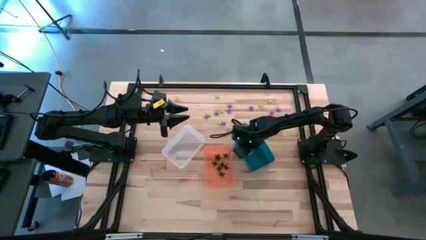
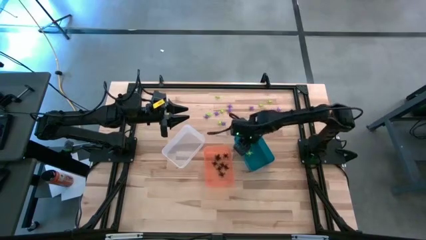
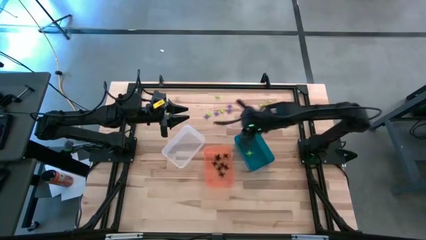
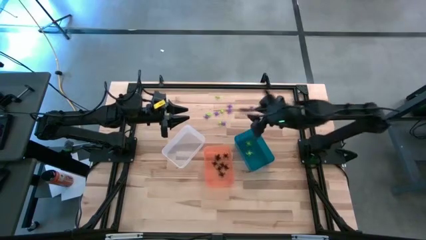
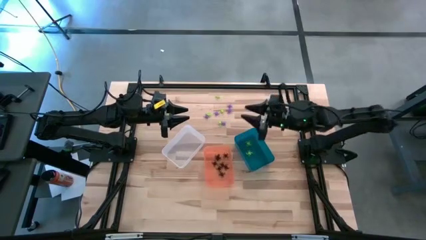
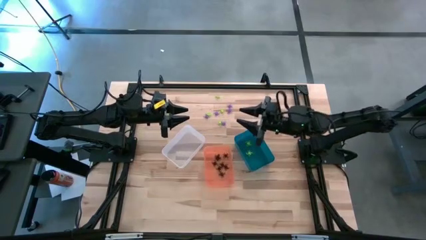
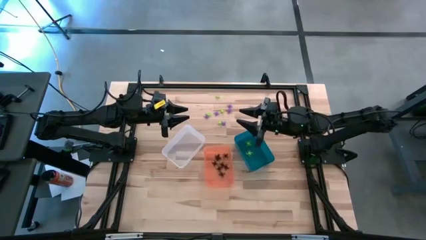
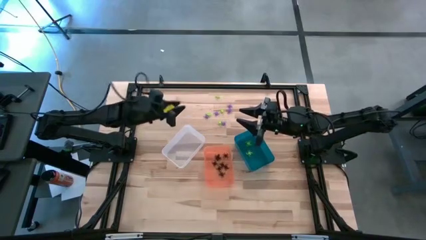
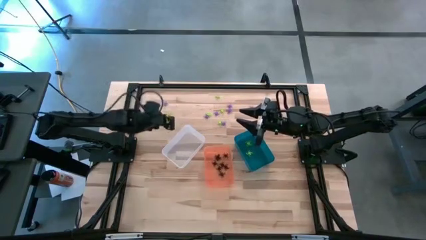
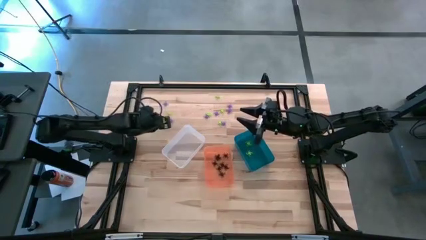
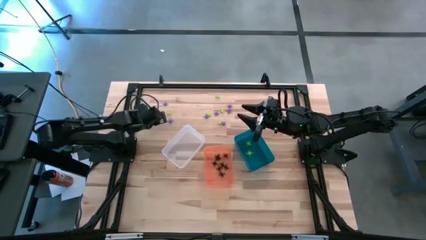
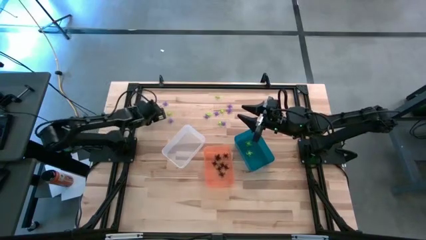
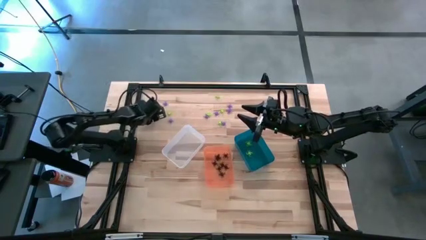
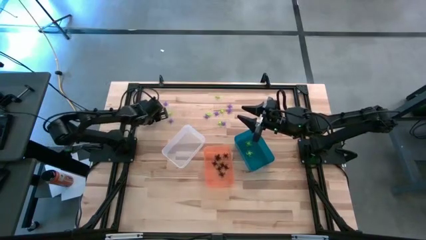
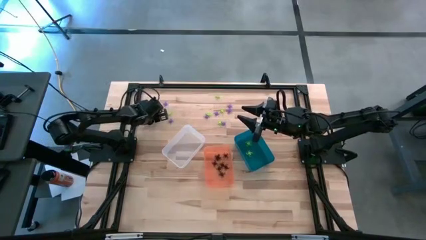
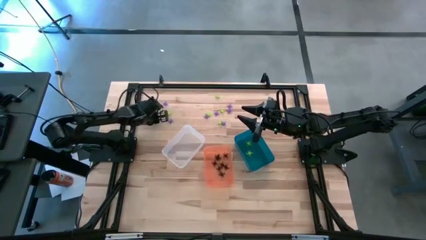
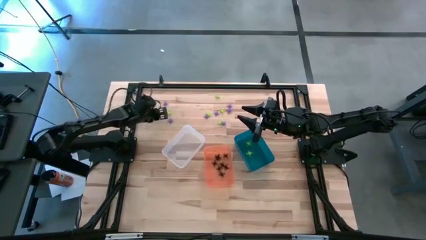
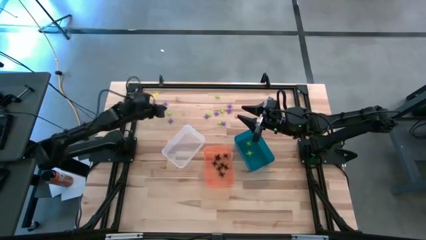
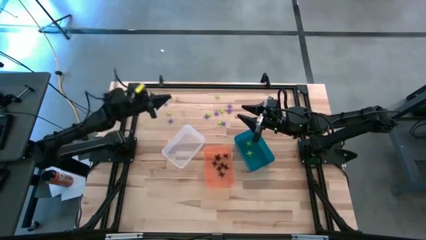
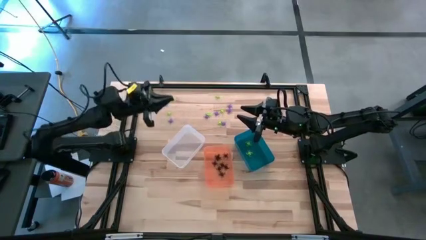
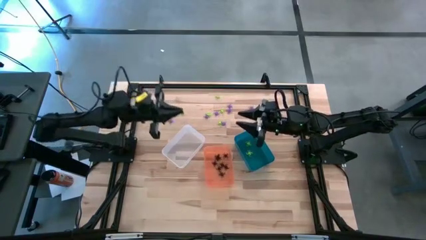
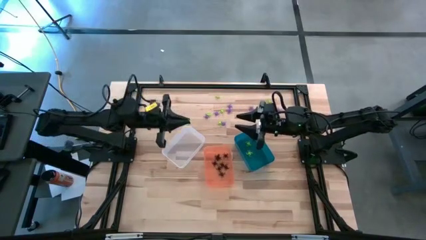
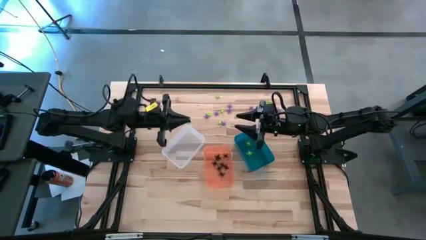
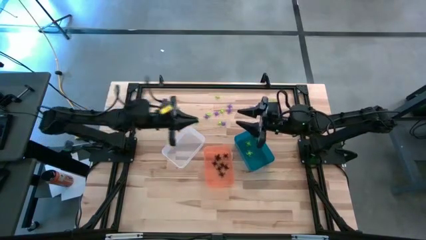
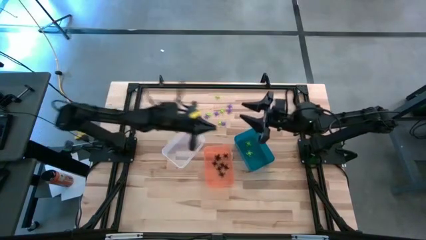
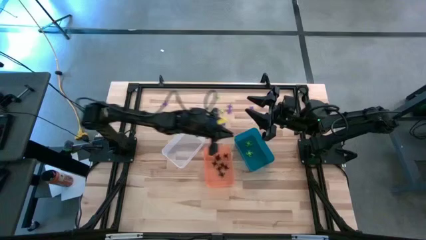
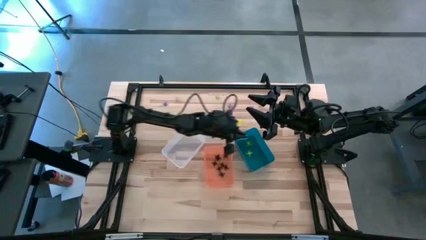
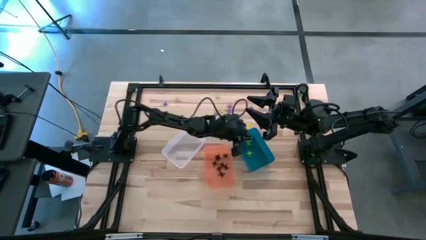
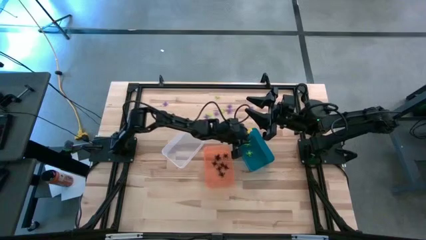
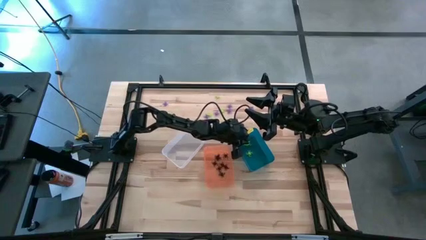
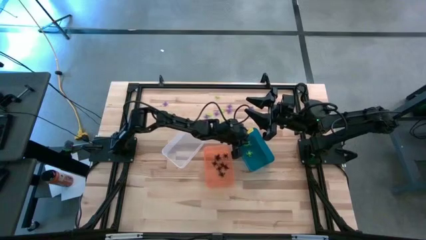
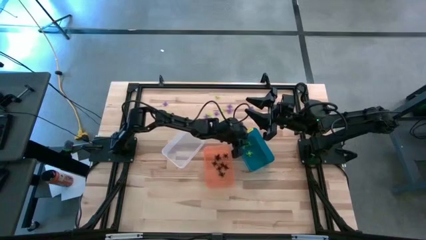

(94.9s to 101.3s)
Task: Sort Halloween decoration
Put the green spider toy into the blue bin

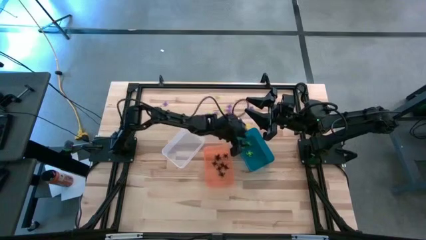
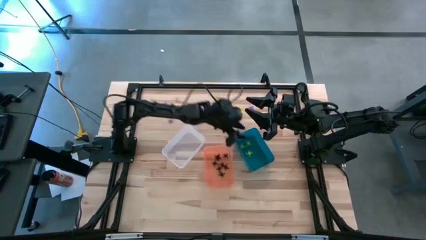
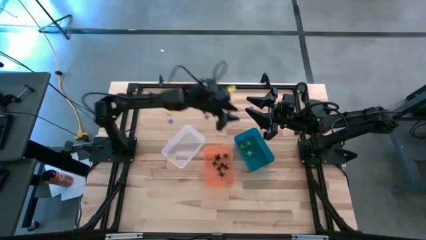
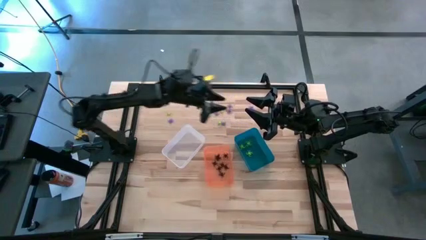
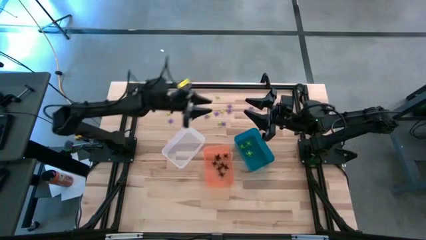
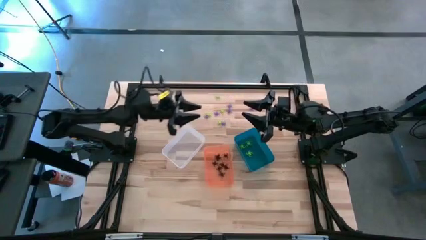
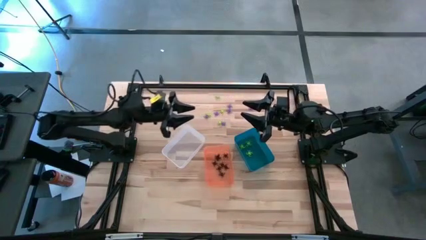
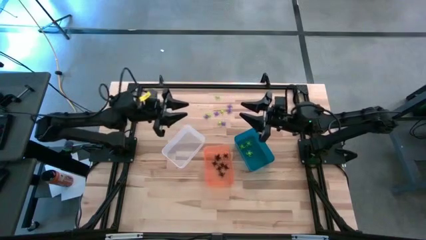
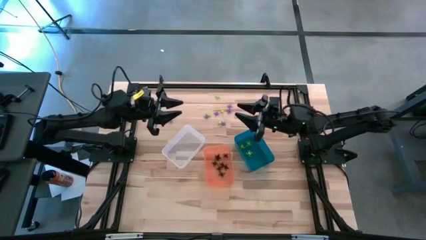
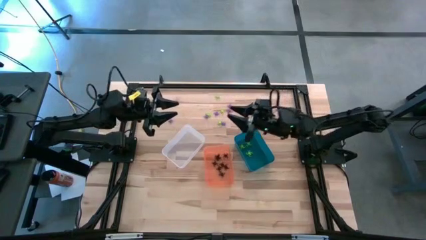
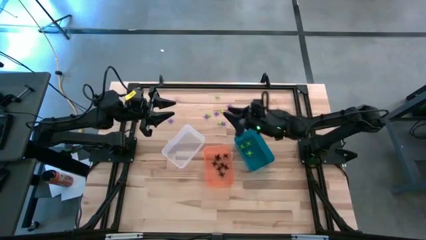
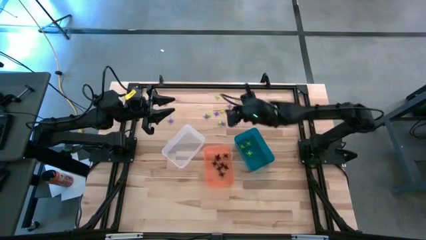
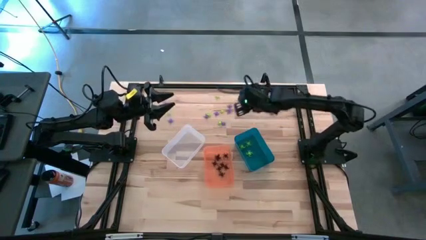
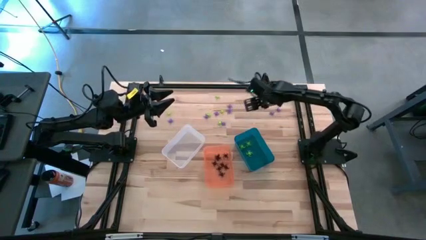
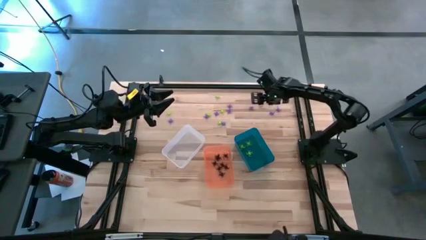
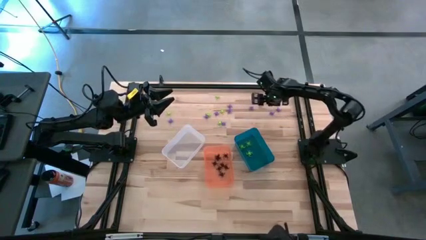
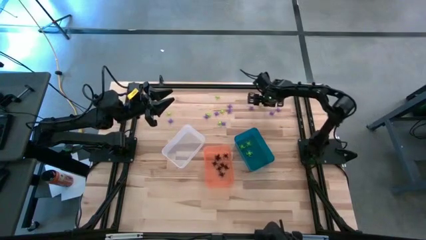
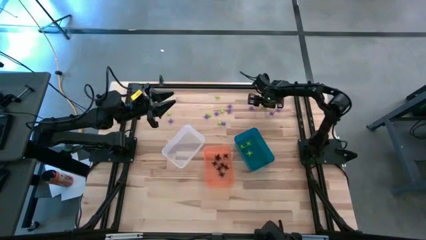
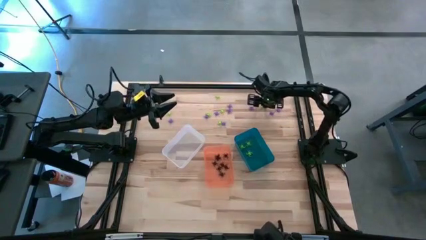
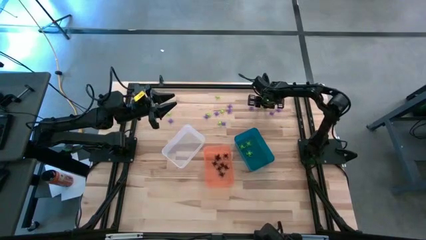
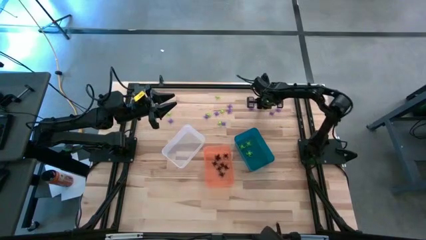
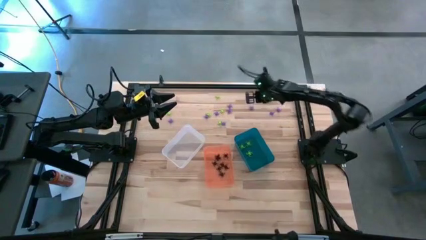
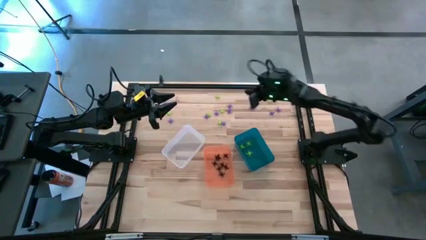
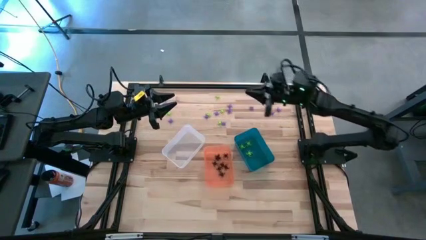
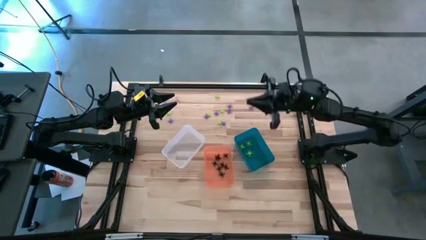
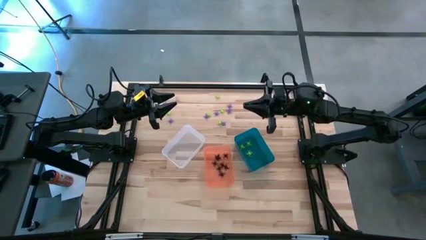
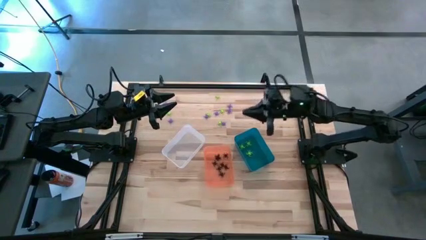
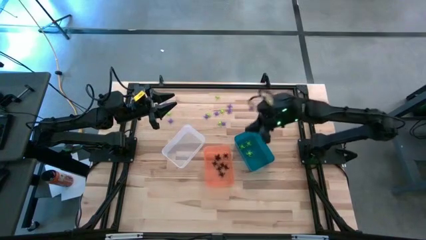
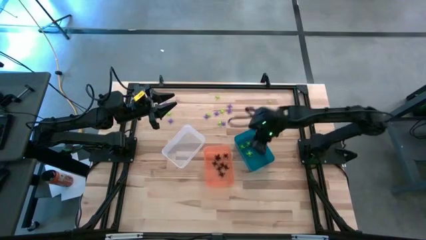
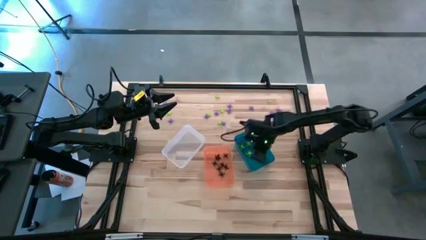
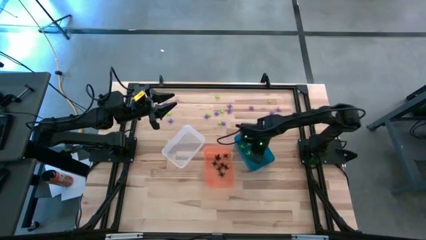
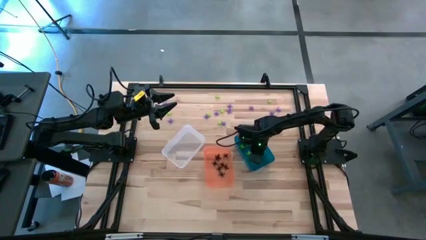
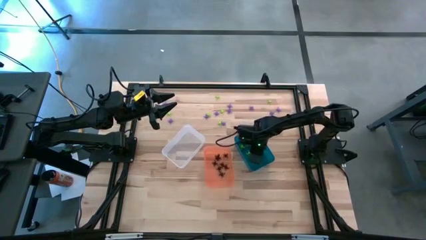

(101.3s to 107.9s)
Put the green spider toy into the blue bin

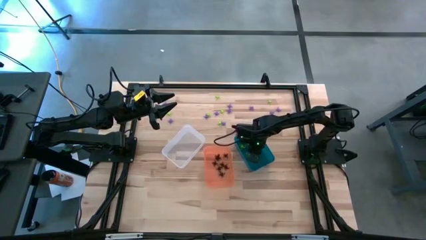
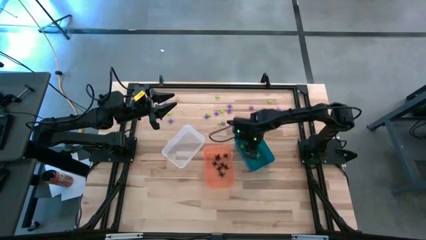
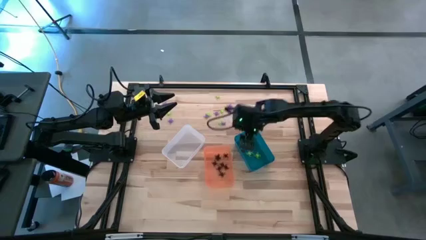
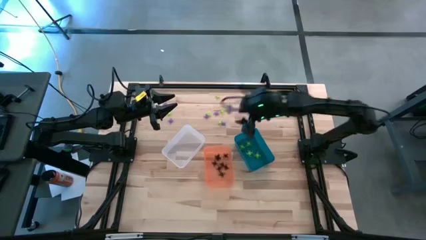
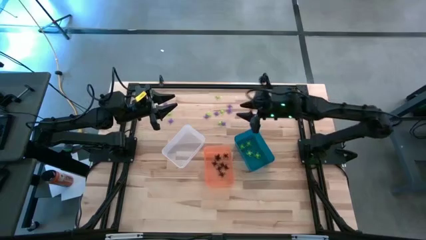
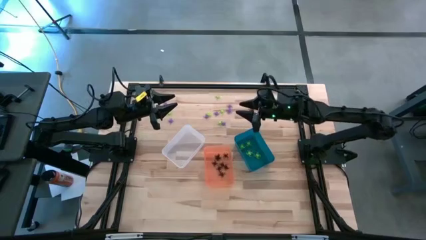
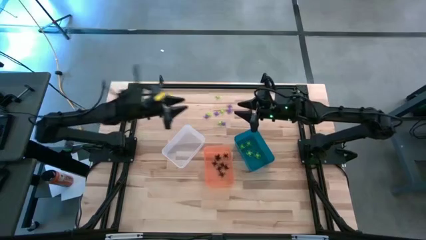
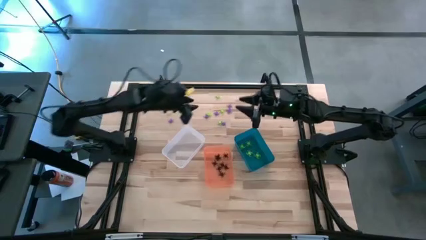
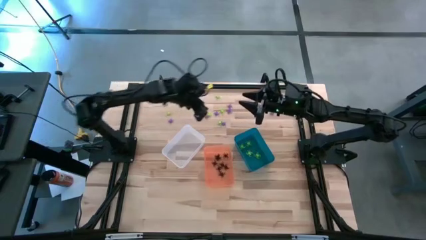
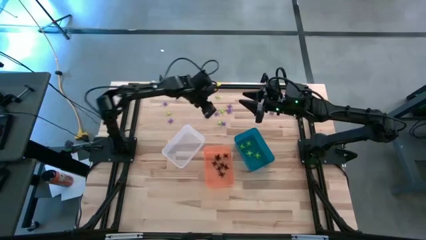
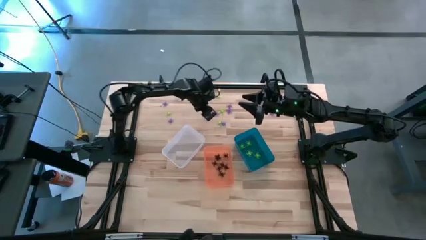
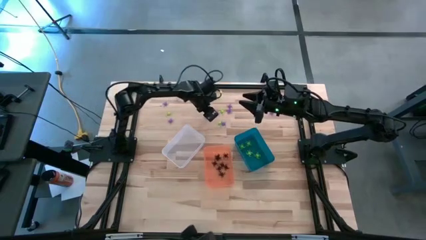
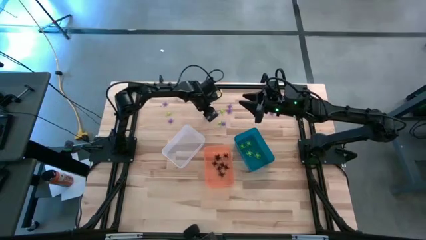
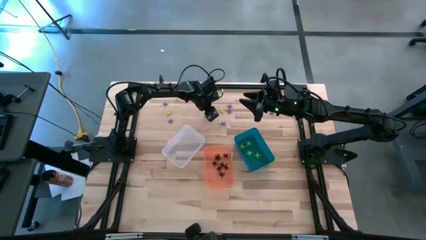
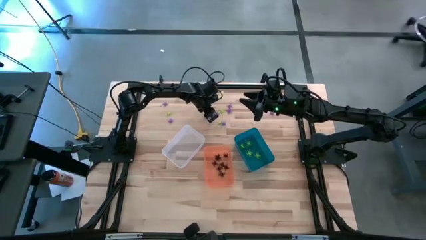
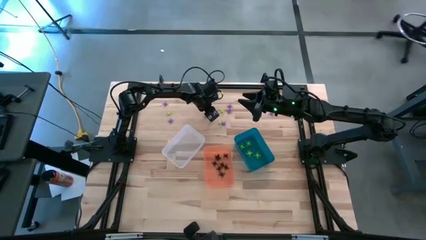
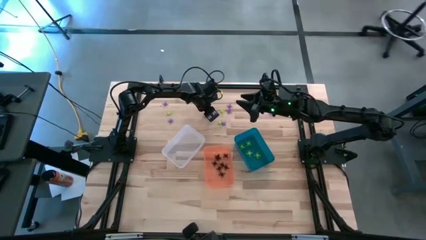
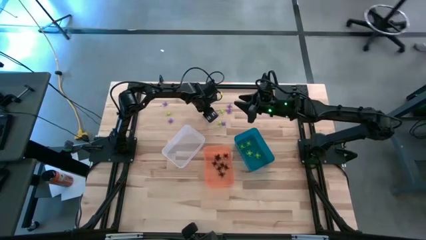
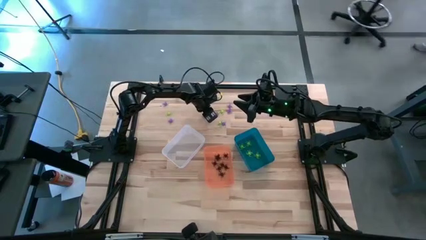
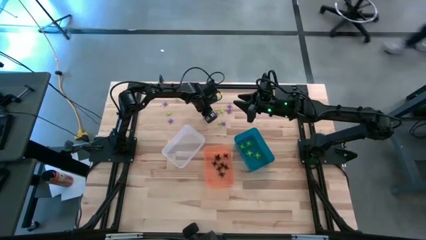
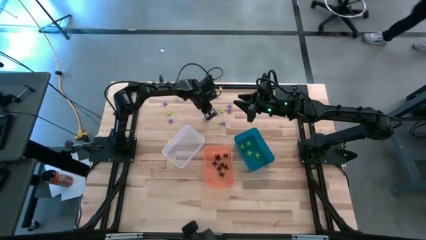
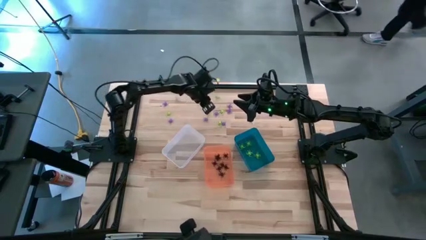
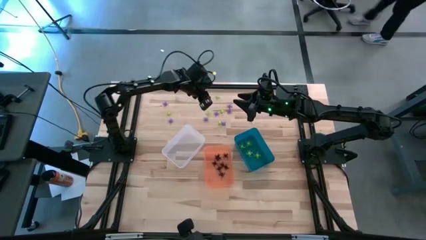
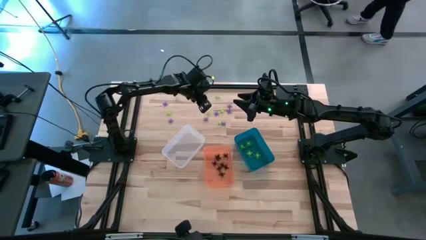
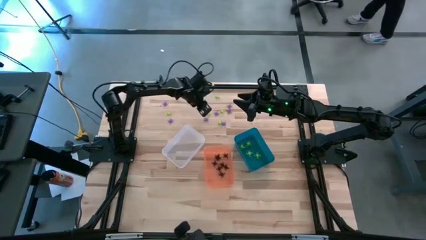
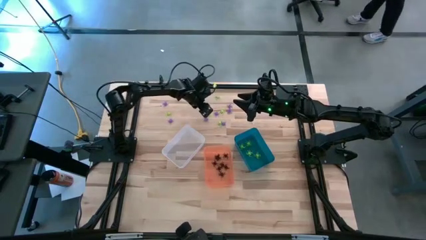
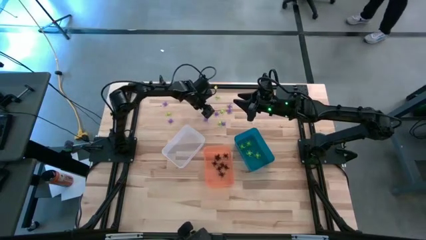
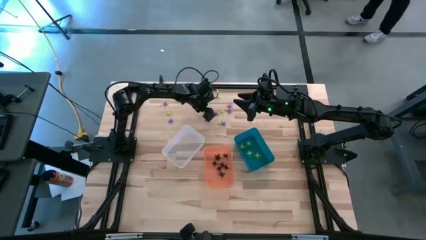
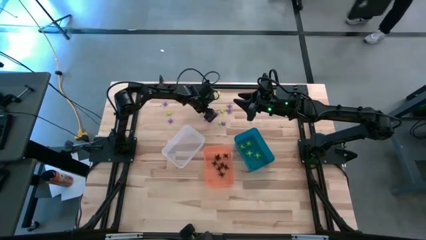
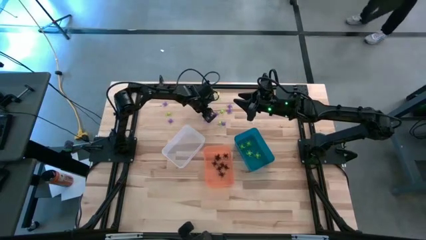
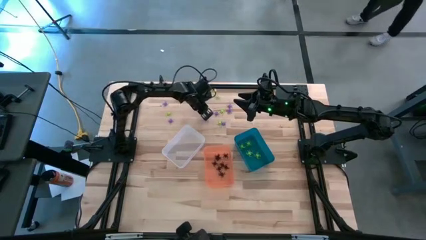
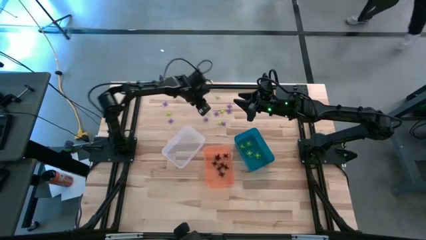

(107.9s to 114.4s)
Put the green spider toy into the blue bin
